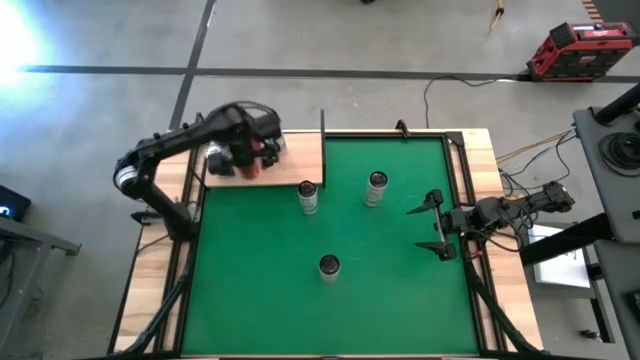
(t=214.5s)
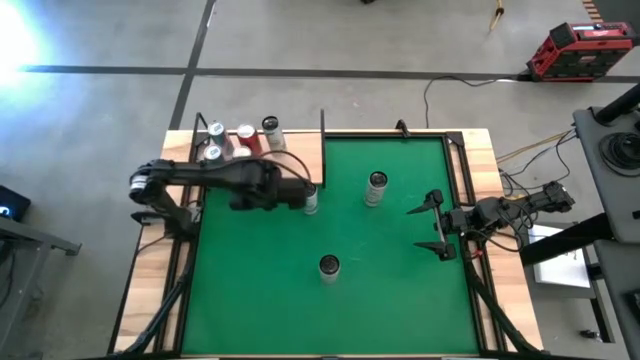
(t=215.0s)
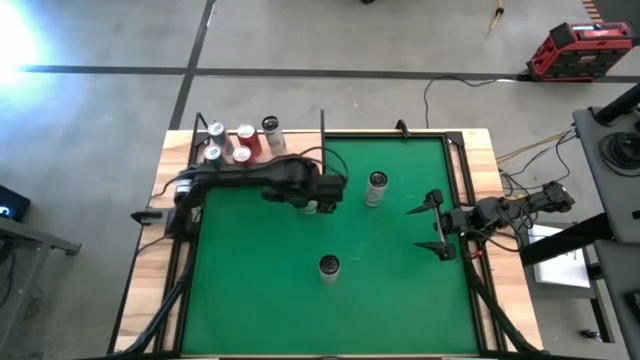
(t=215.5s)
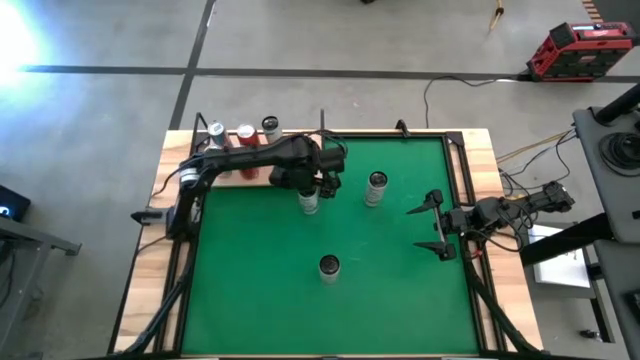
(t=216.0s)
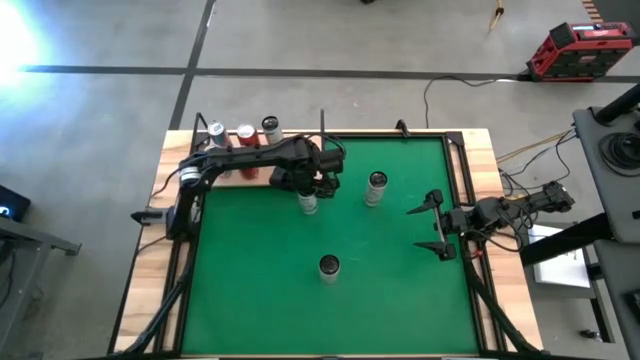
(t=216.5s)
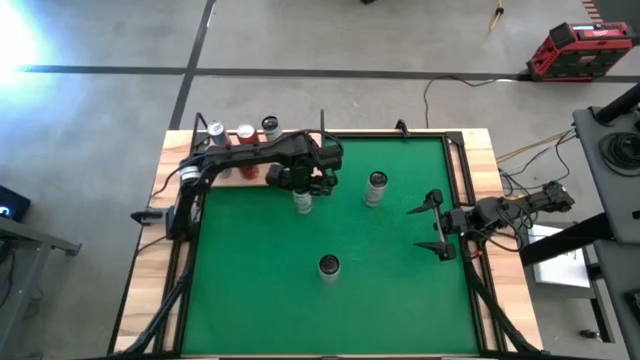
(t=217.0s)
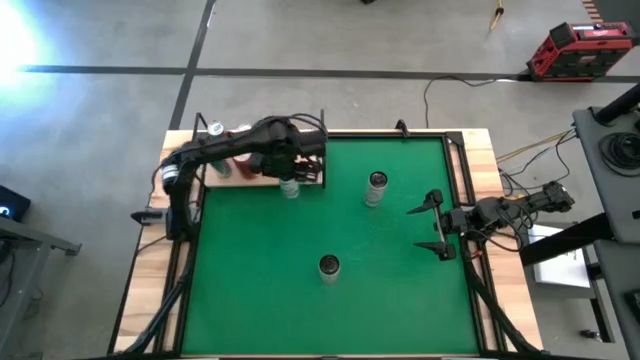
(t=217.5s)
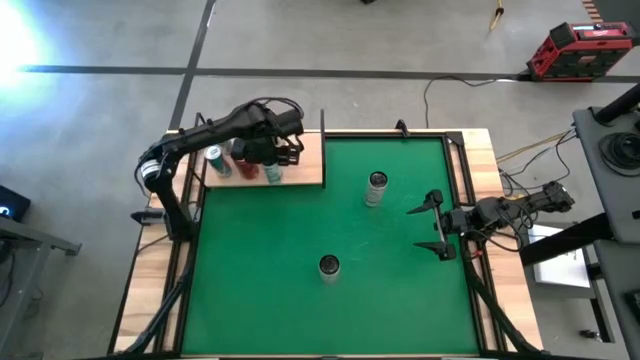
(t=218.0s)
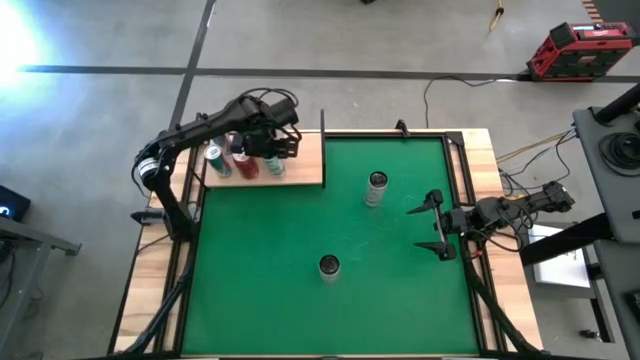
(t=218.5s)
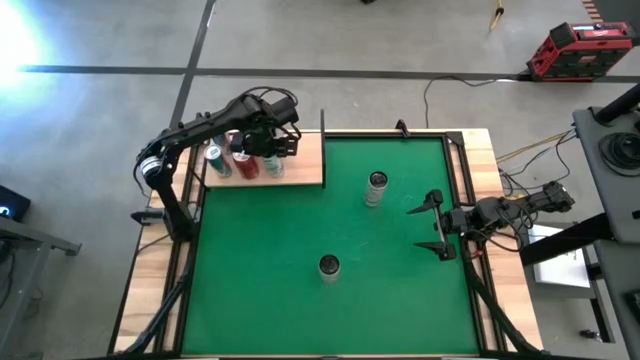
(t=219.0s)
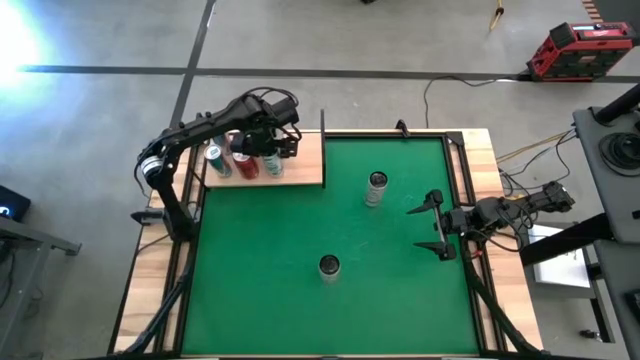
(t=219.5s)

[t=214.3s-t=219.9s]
Task: Place canned beverage on shelf
Put the white blue soda can on the shelf aligned with the other white blue soda can

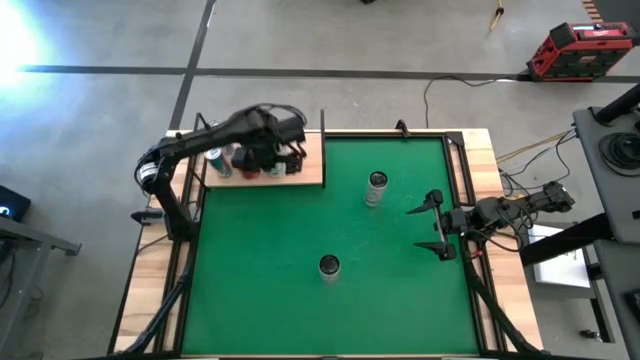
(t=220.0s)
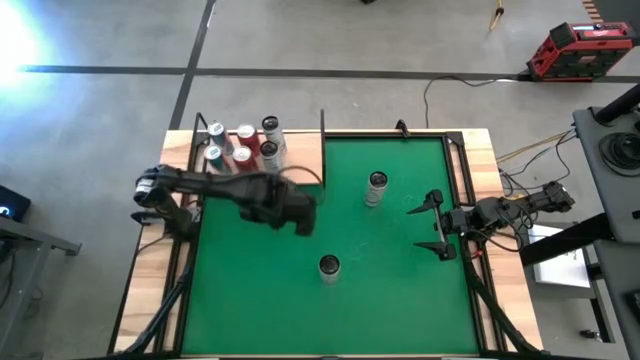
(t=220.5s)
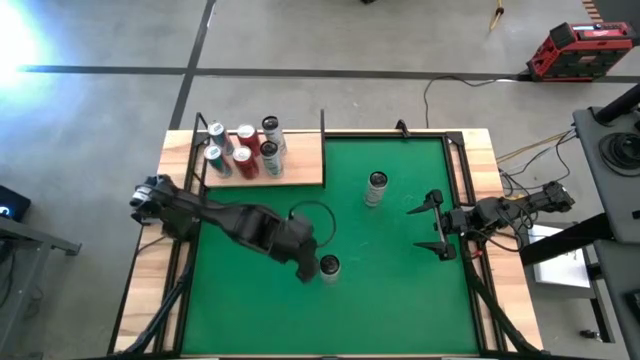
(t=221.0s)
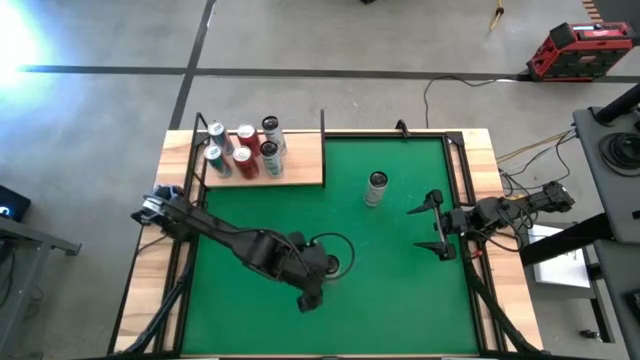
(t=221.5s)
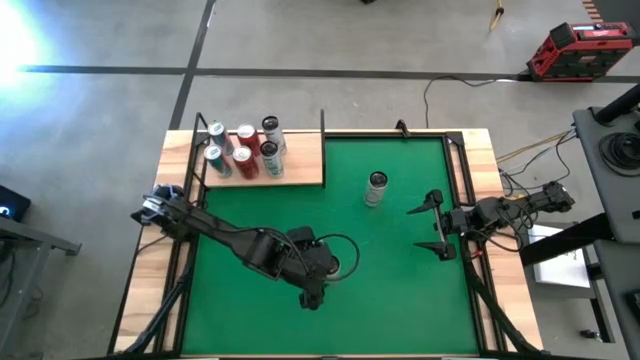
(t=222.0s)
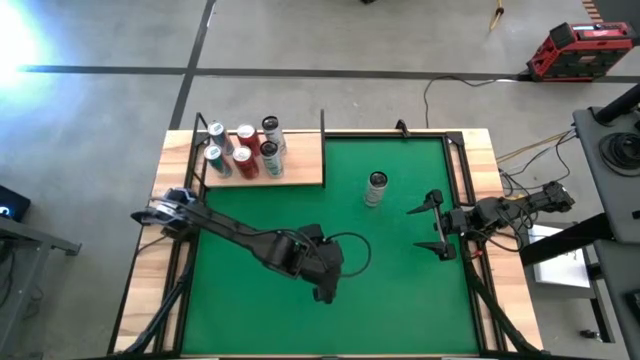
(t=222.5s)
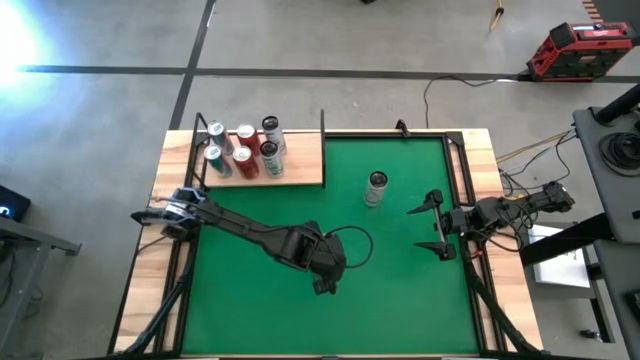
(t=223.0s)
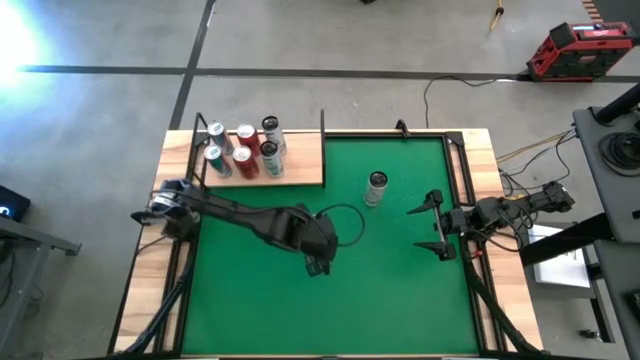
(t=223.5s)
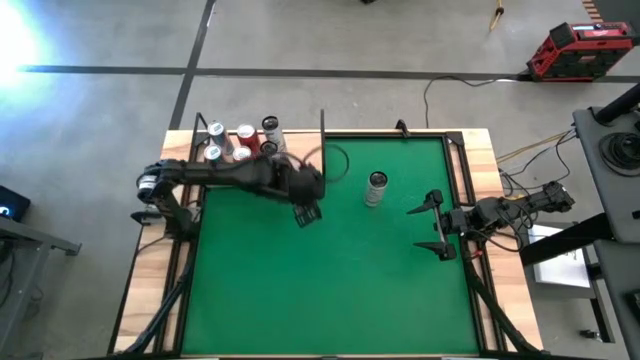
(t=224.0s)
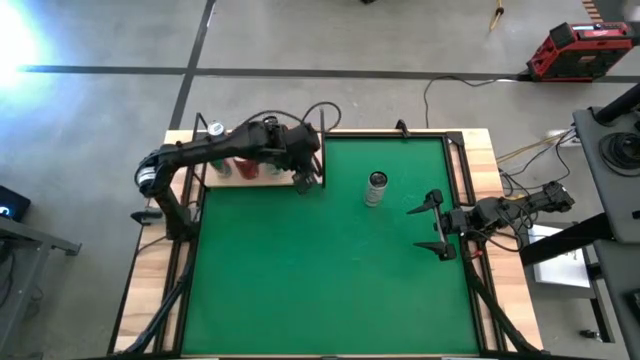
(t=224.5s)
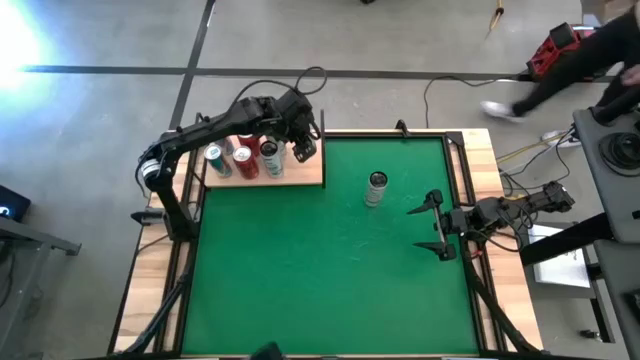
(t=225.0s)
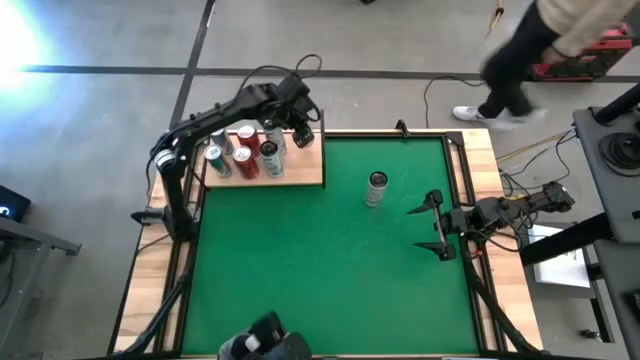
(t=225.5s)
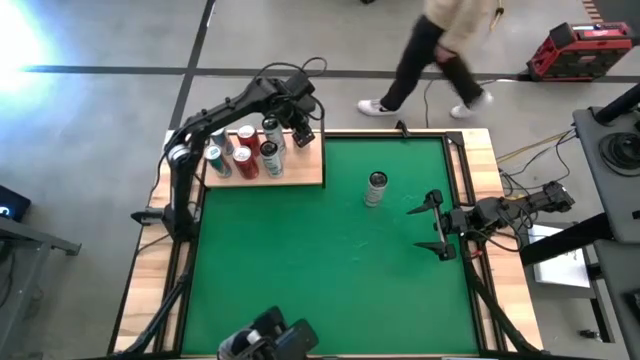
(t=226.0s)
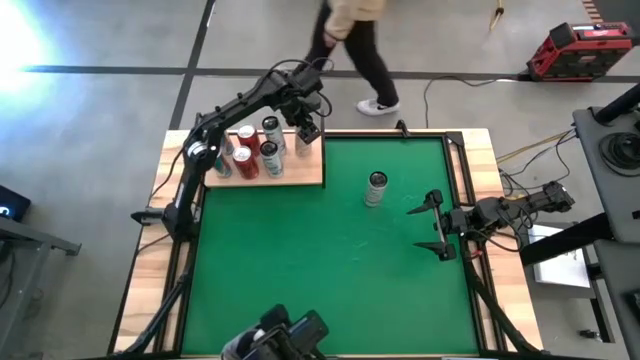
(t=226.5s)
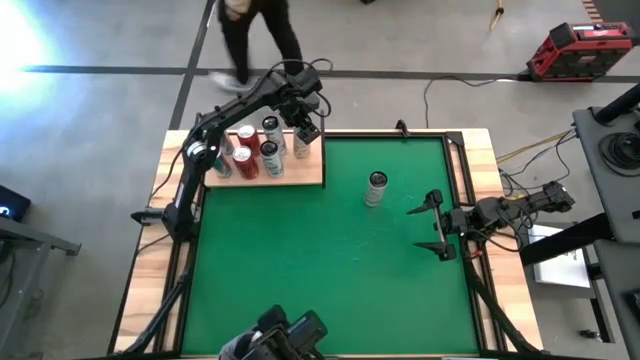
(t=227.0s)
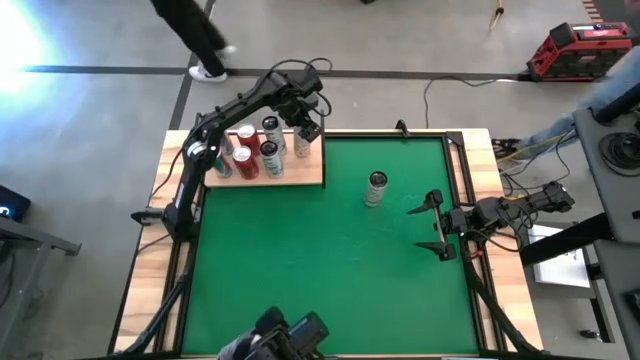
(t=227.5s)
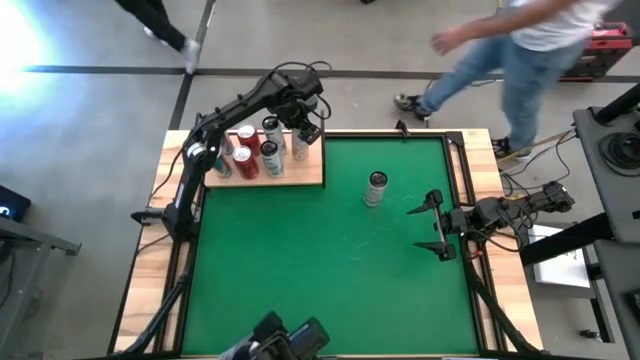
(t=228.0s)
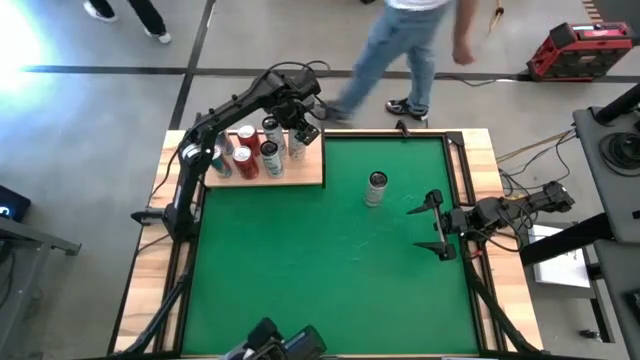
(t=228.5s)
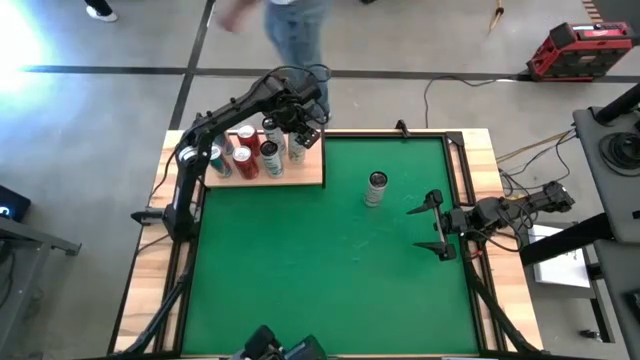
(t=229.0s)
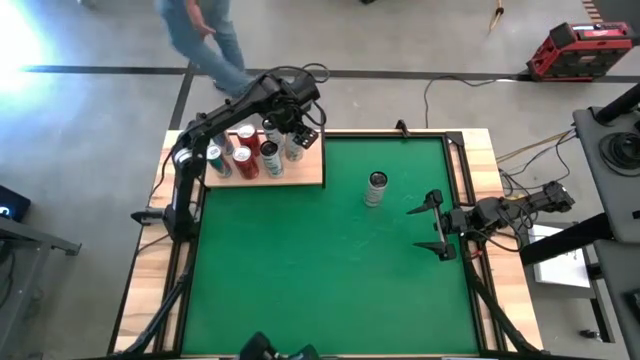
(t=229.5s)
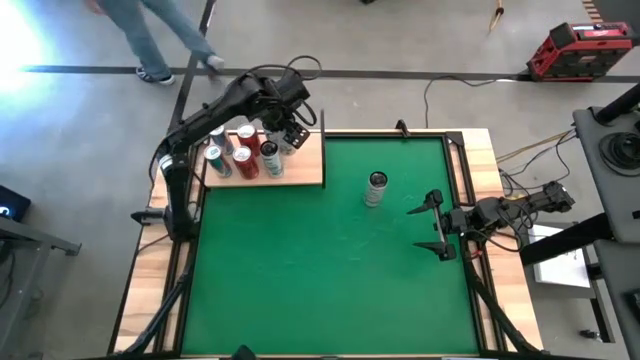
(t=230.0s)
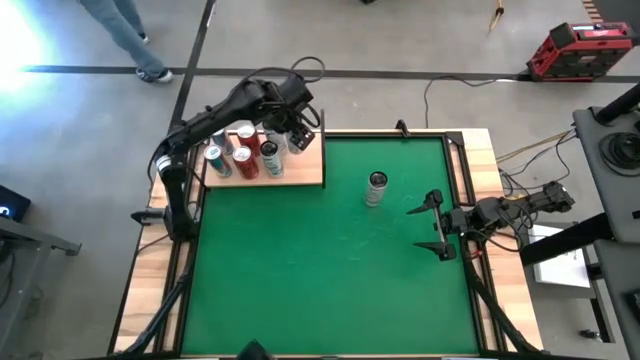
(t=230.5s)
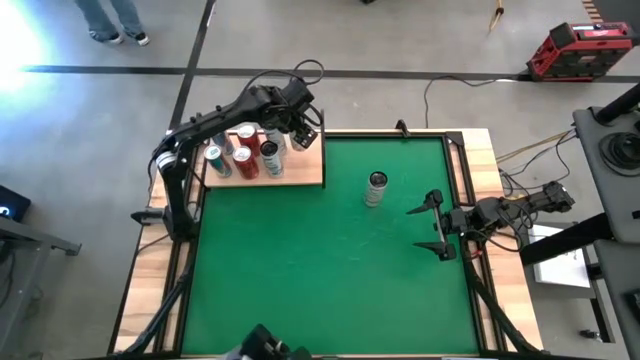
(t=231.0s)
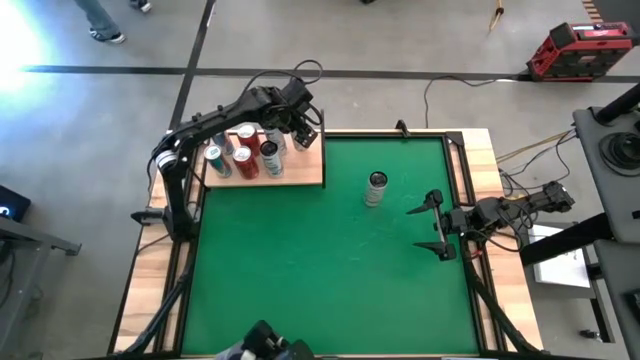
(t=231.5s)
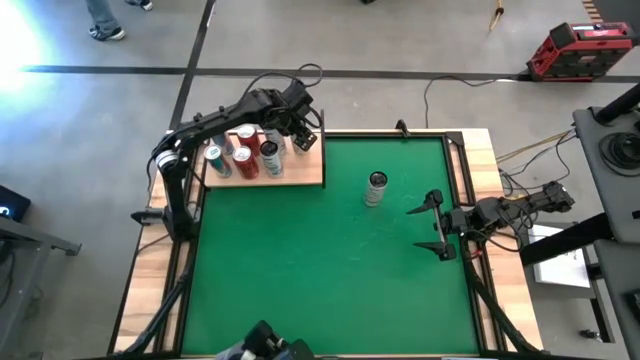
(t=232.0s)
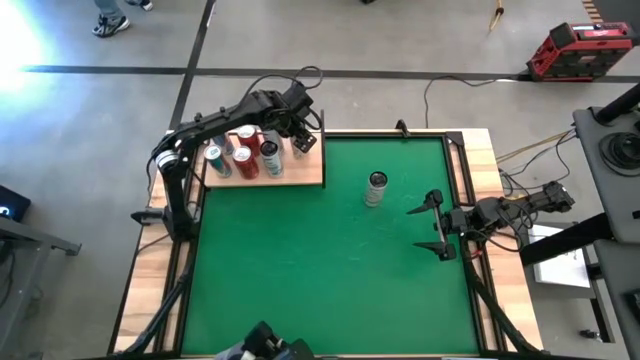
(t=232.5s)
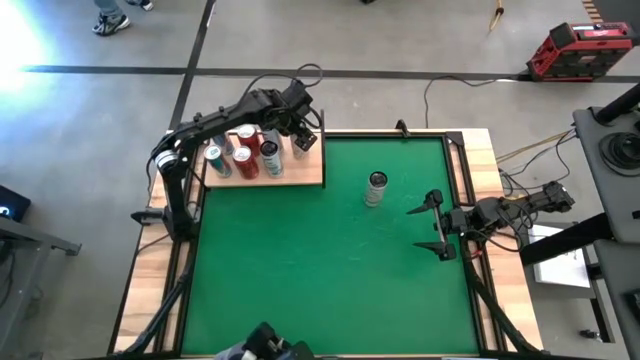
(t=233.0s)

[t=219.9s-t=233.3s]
Put the bottom white yellow soda can on the shelf

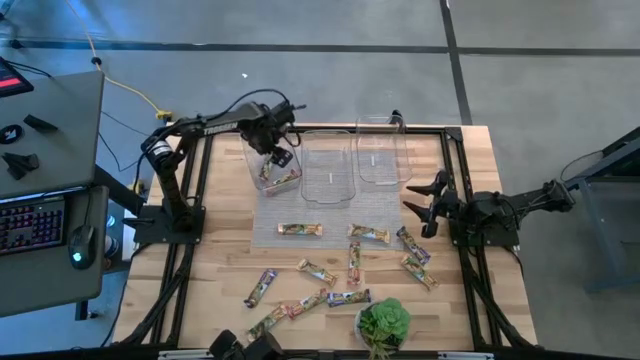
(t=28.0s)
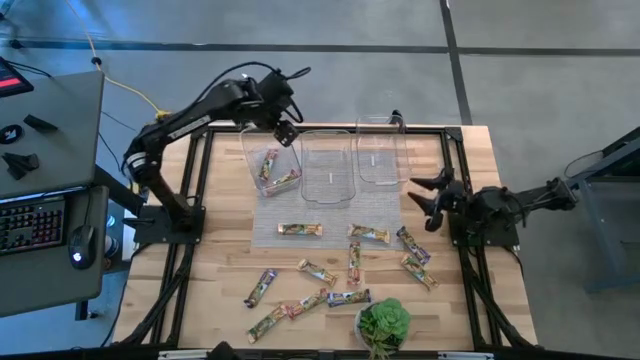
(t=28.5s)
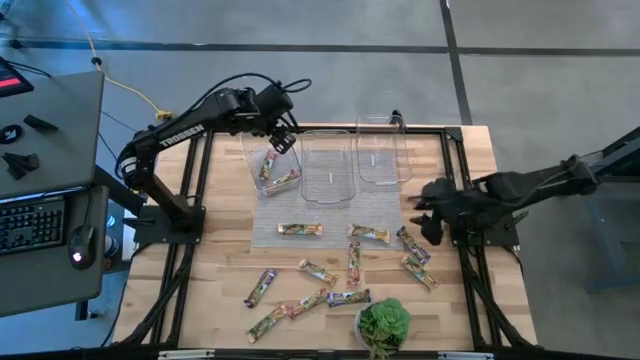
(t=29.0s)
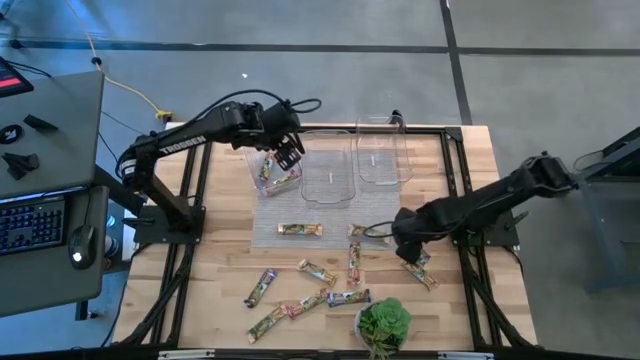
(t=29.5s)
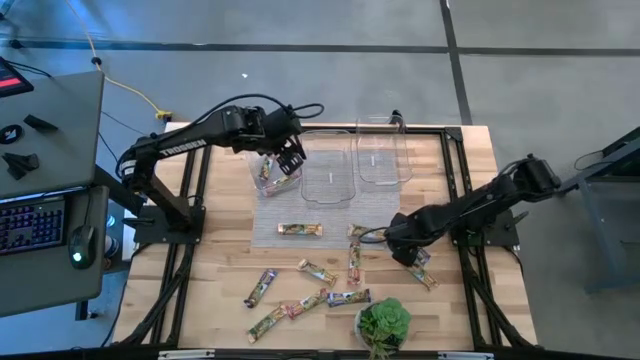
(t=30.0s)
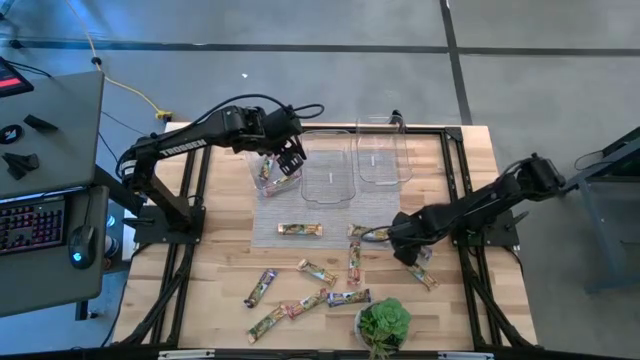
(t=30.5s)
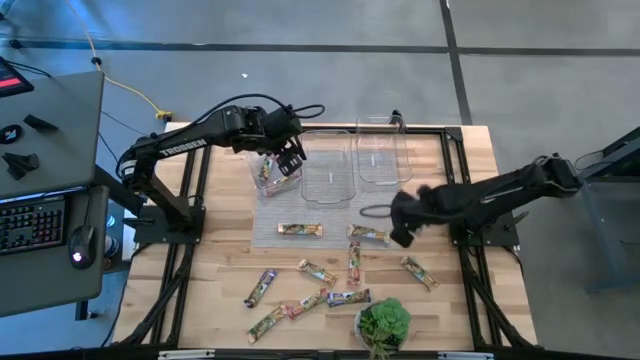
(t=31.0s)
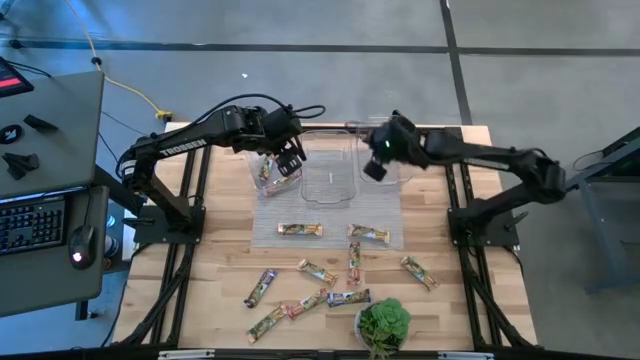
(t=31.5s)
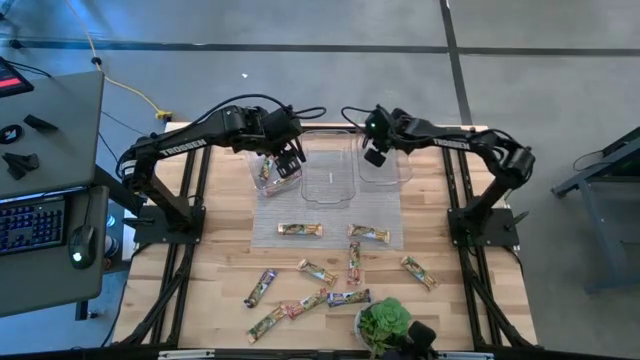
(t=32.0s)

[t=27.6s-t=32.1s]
Task: Pick and place Granola Bars by type
Put the blue granola bar into the right transparent bin
